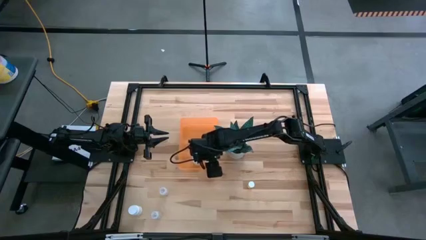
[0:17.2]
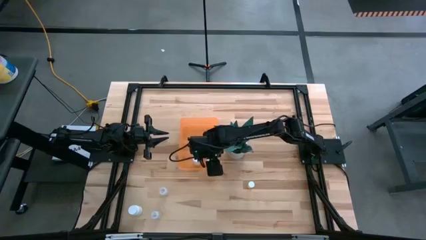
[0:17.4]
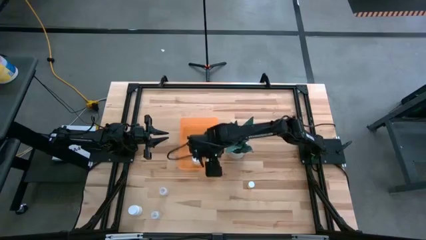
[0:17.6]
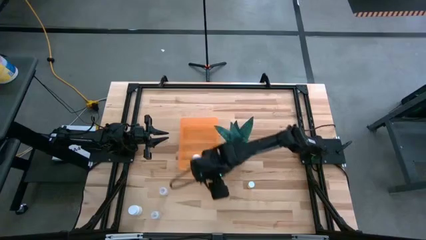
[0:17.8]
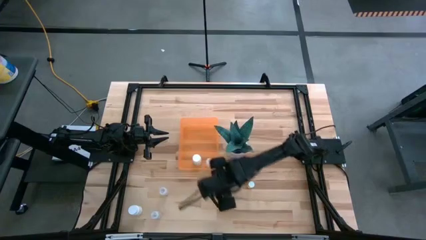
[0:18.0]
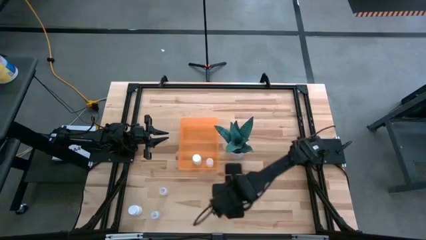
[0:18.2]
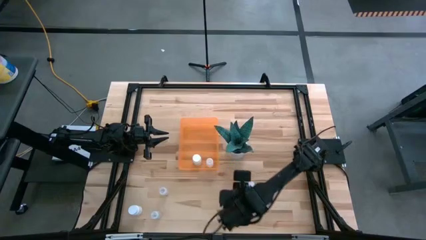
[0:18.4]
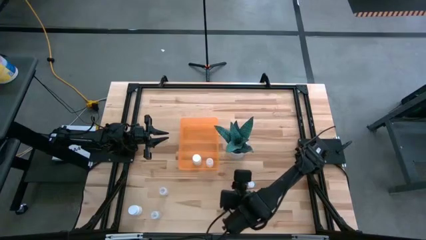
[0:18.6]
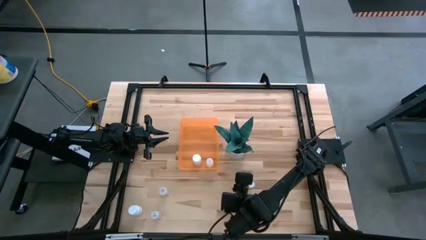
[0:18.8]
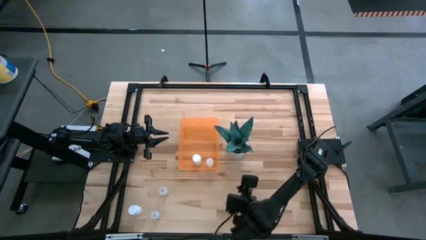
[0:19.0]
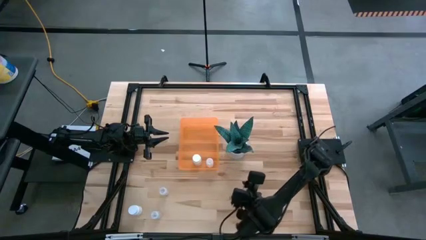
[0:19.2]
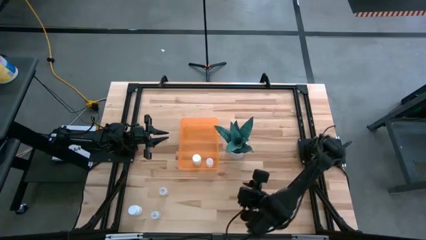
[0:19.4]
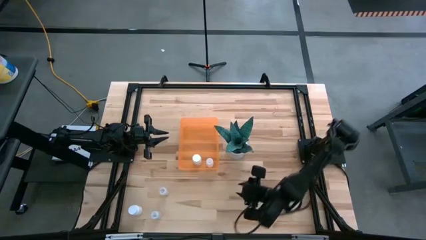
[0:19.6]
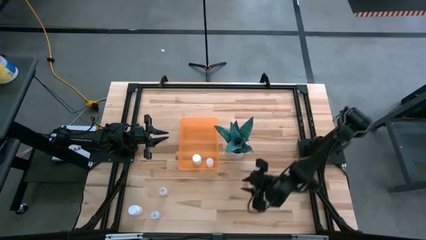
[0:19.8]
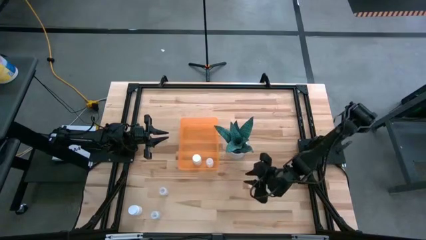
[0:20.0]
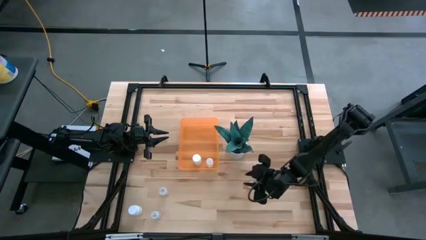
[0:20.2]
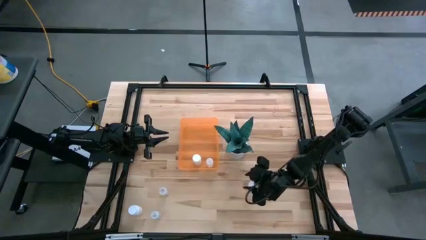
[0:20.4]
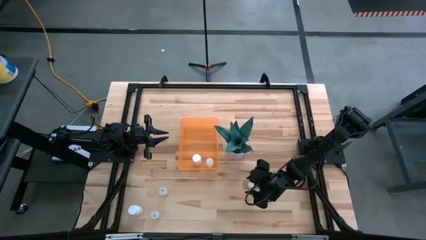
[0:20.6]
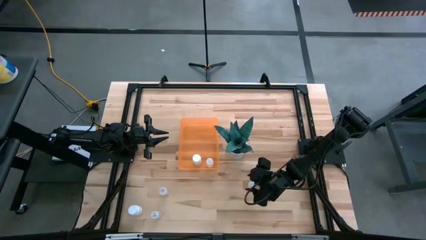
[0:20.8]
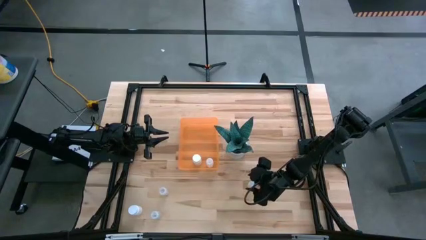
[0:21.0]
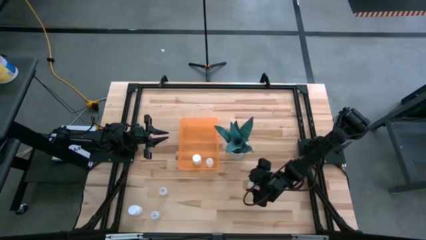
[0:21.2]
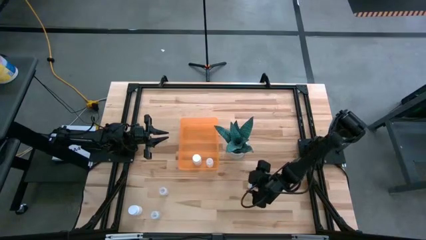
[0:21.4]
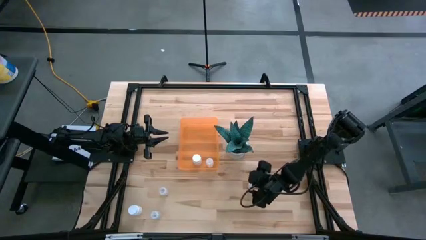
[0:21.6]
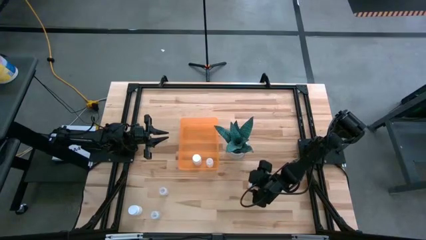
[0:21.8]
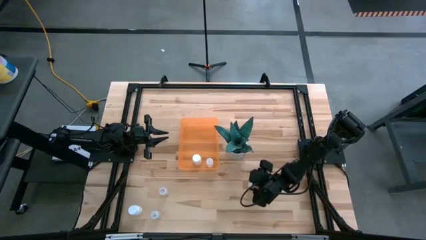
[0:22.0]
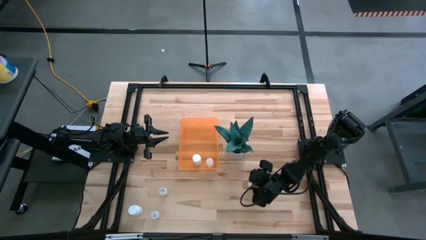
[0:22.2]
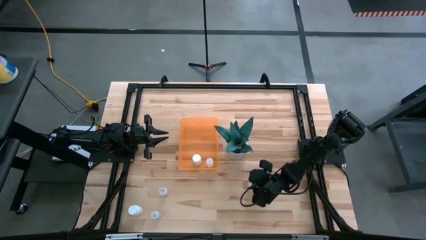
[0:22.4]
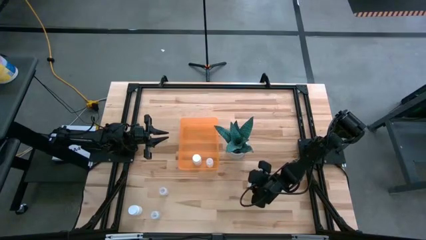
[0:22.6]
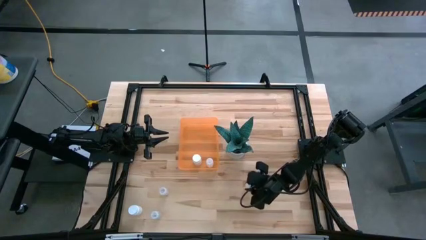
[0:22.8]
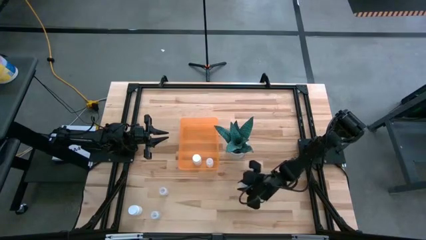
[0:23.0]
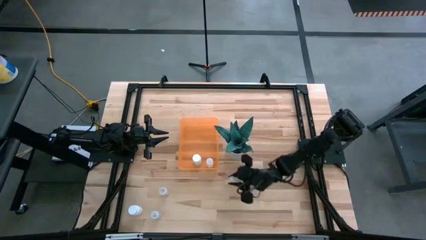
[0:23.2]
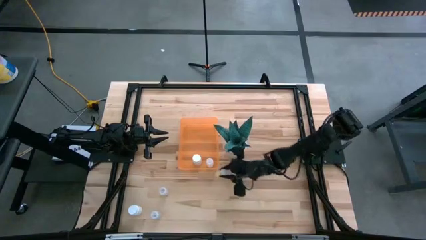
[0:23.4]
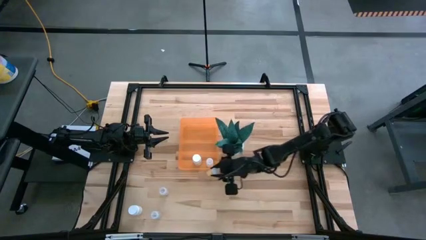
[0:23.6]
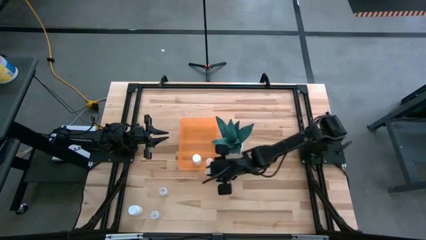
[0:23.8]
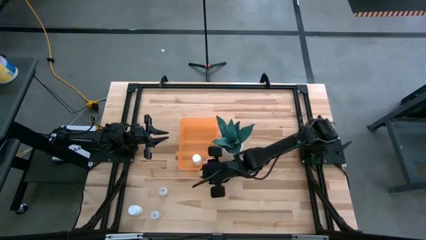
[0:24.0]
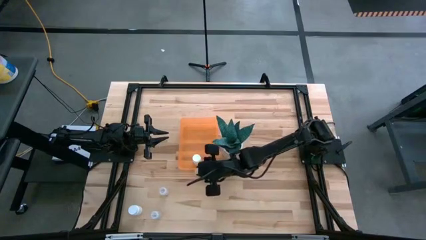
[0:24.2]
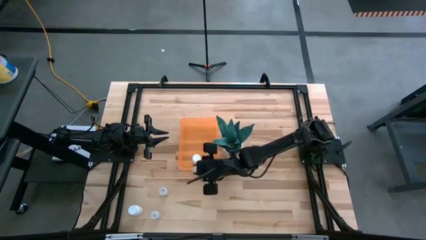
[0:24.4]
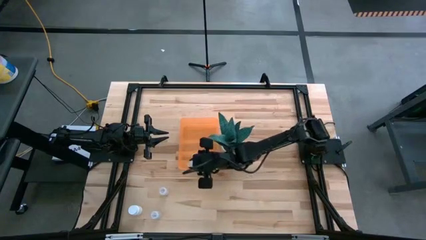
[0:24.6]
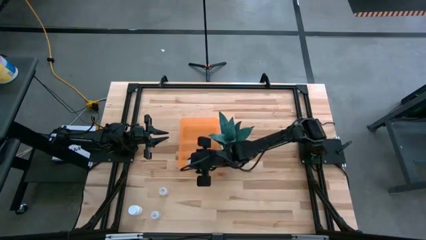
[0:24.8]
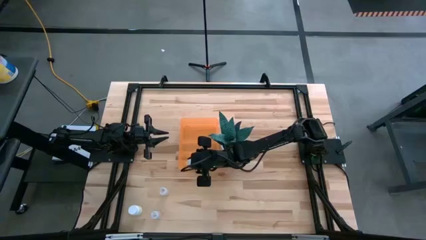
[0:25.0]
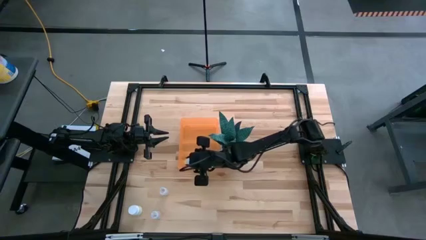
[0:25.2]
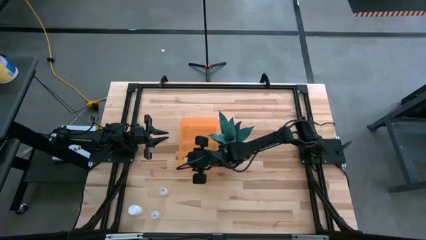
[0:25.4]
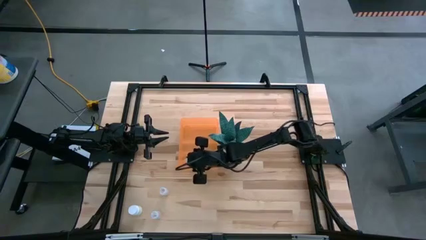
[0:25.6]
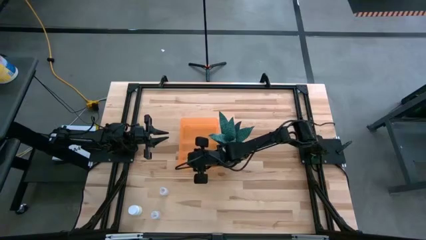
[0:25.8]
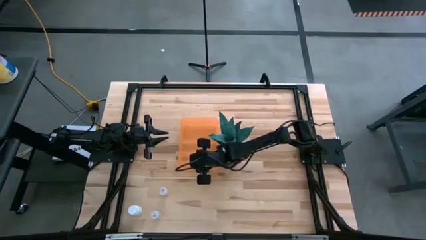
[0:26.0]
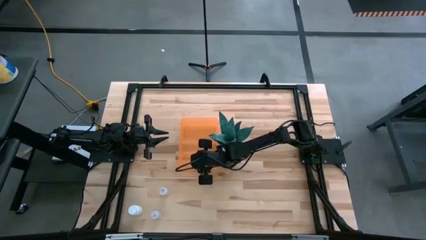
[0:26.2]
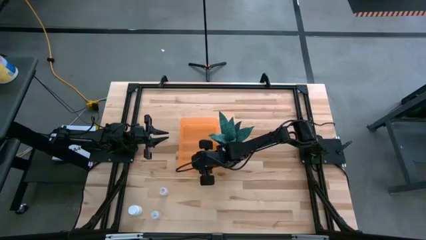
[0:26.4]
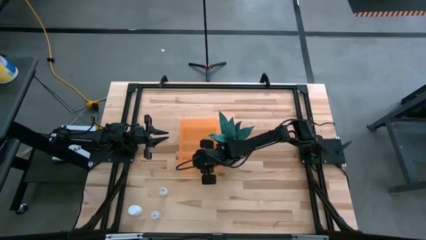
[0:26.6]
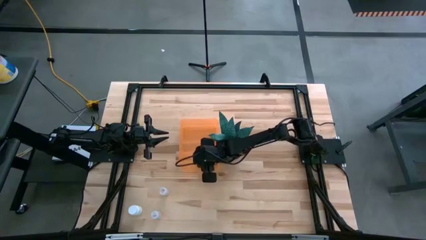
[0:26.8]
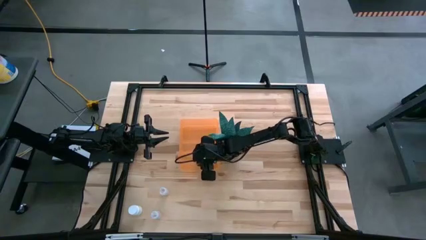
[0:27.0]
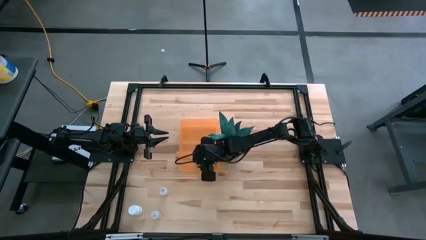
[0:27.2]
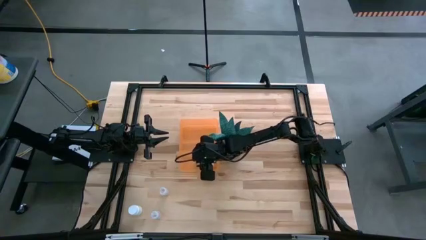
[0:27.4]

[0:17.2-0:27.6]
Task: Pick and place pill bottles into a basket
Put the yellow pill bottle into the orange container

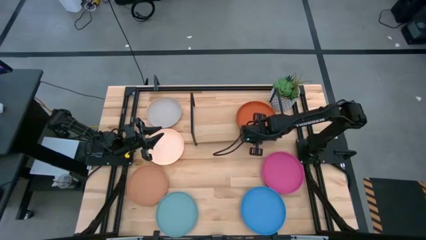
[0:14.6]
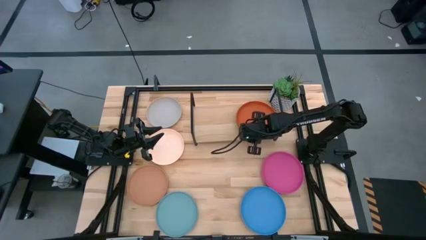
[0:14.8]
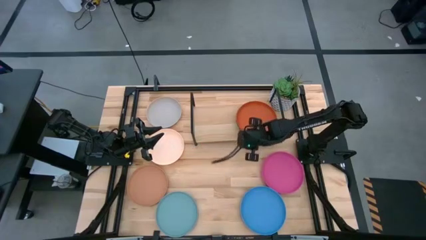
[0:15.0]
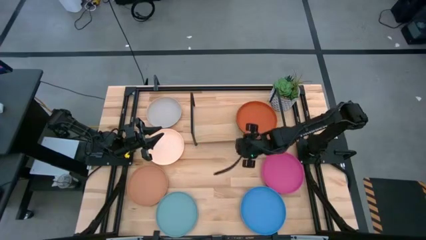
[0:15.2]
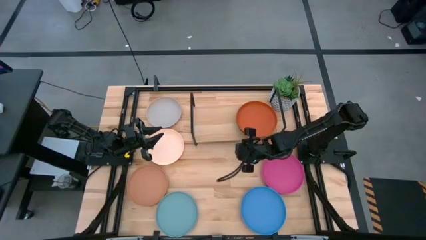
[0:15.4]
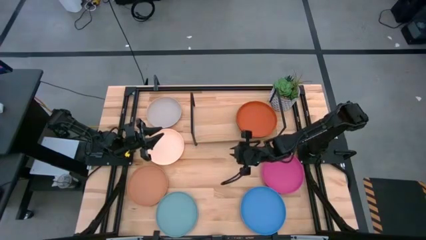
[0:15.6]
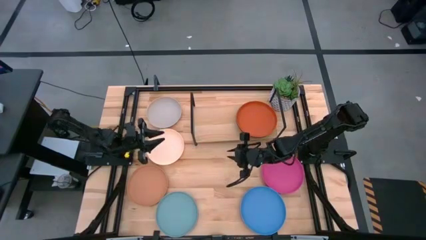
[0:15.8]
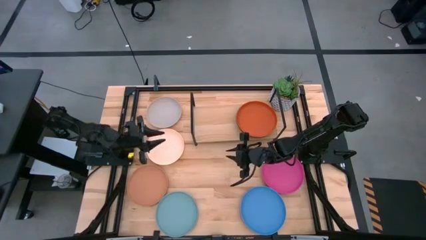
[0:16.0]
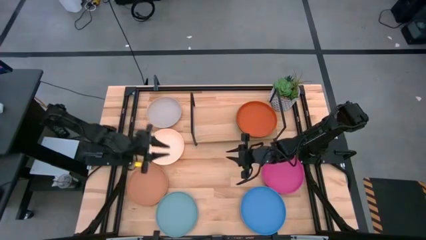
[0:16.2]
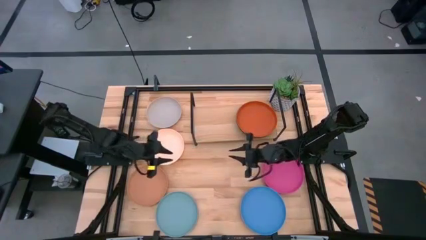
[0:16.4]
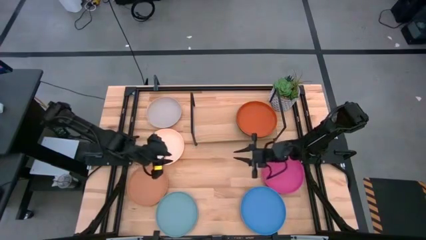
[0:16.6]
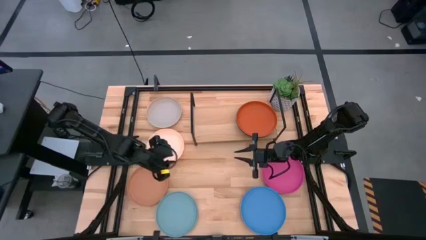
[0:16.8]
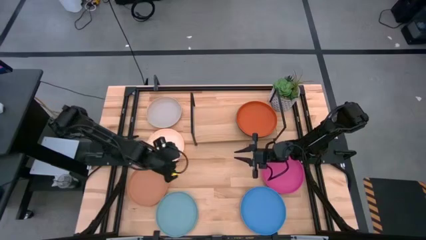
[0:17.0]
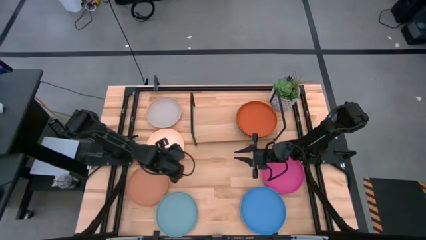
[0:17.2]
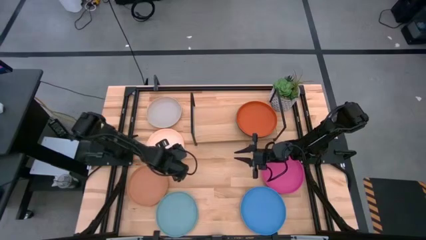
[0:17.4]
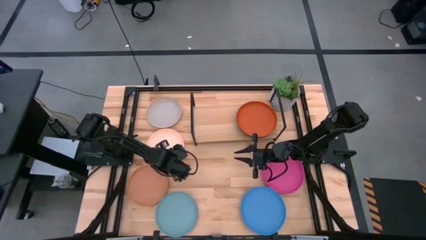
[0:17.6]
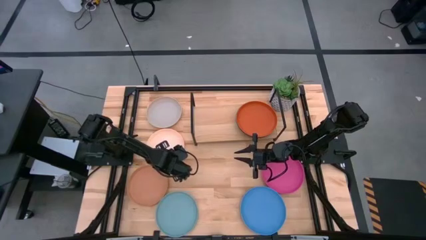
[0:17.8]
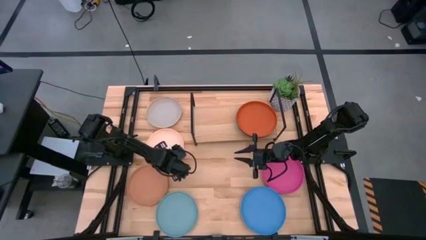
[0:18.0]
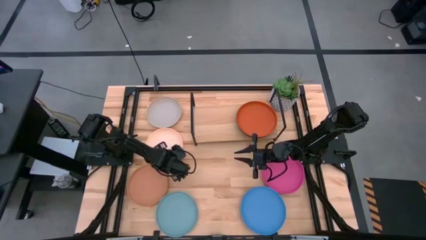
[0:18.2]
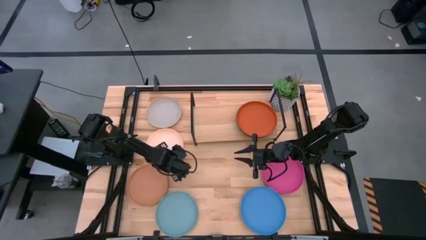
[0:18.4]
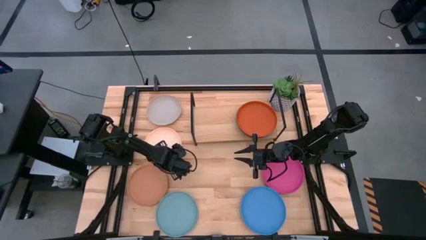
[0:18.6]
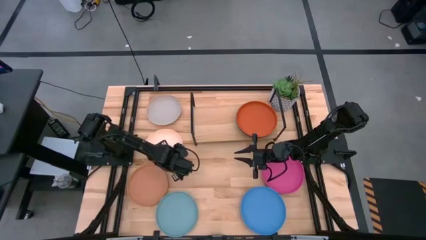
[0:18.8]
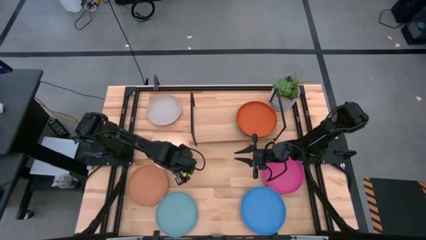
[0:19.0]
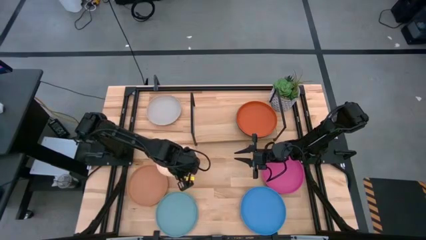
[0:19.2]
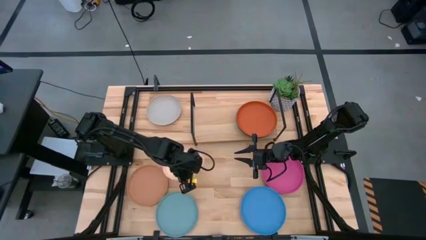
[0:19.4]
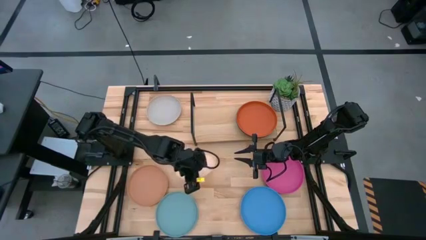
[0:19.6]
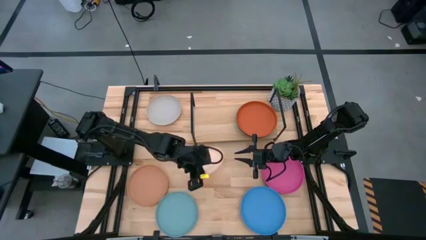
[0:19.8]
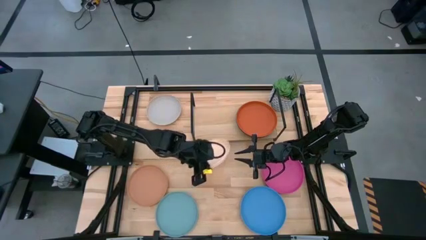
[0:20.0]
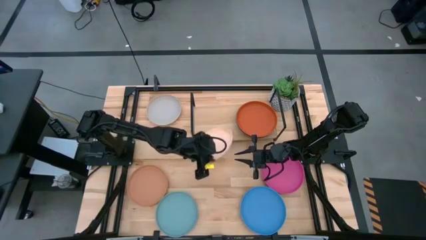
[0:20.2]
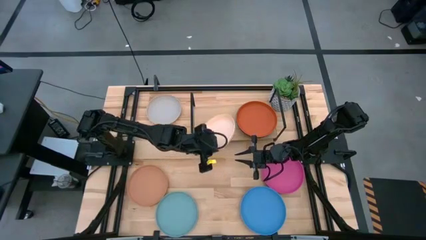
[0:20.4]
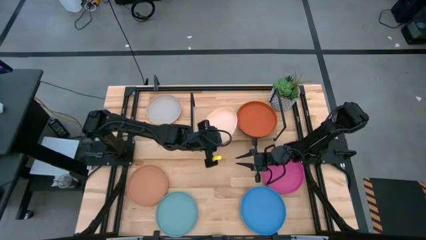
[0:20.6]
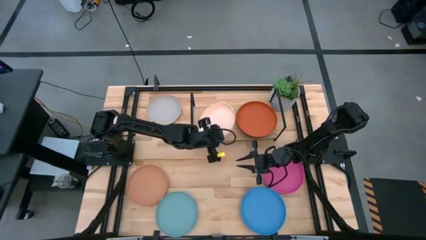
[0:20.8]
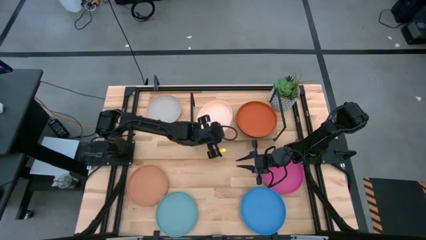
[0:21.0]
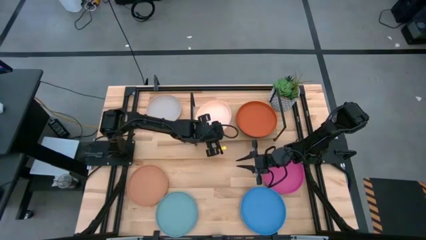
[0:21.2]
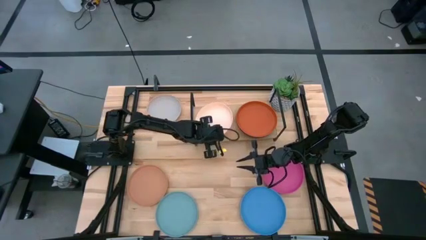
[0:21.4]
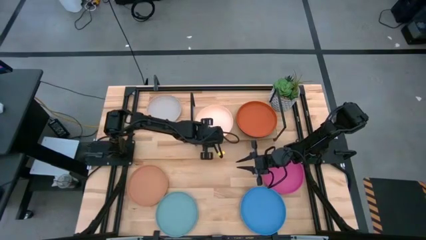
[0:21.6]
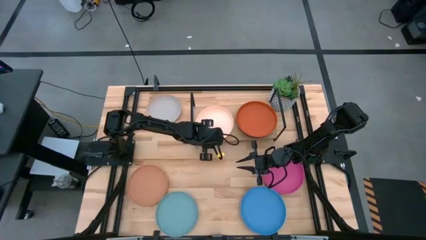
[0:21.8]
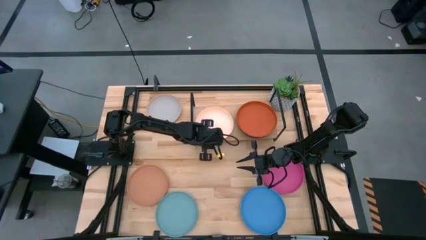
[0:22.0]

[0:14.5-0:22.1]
Task: Place and stack plates onto a shelf
Put the light pink plate on the shelf
